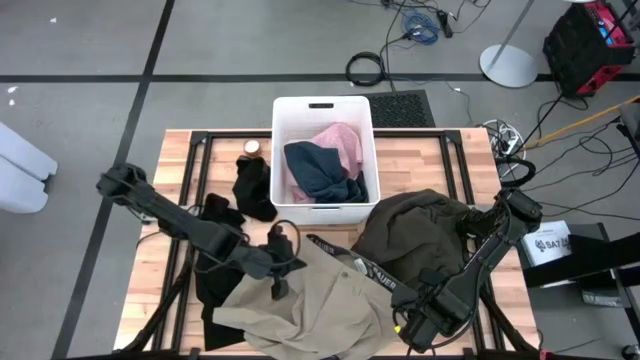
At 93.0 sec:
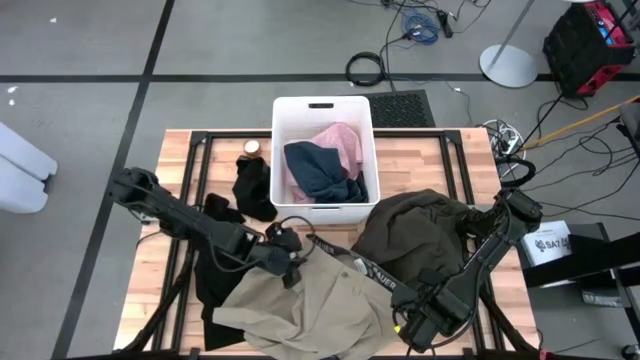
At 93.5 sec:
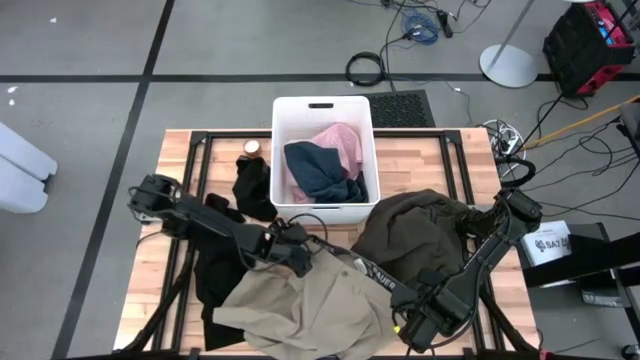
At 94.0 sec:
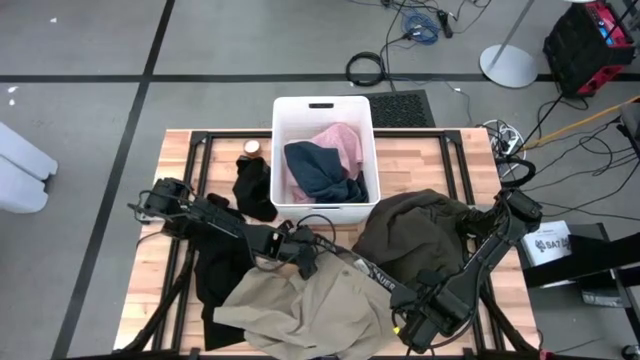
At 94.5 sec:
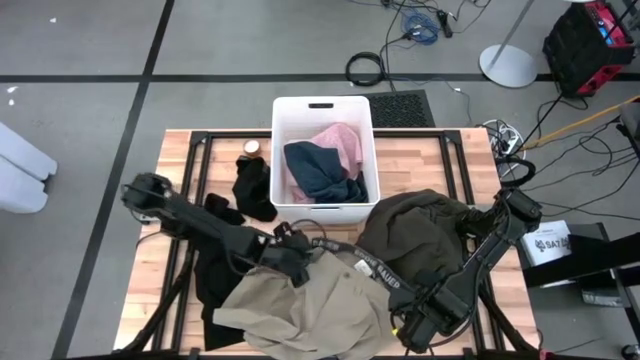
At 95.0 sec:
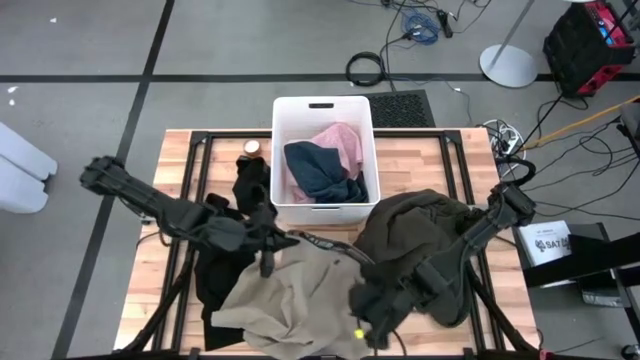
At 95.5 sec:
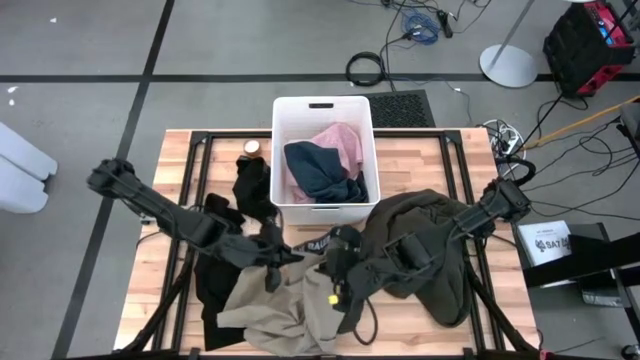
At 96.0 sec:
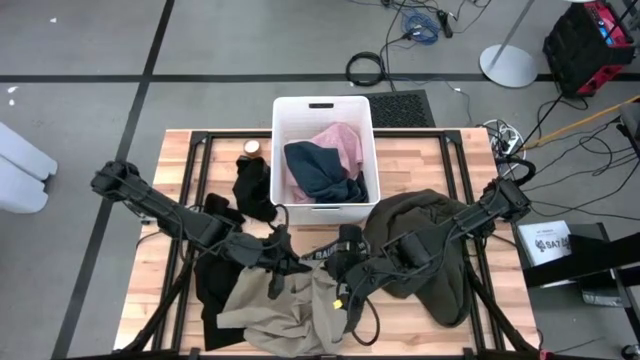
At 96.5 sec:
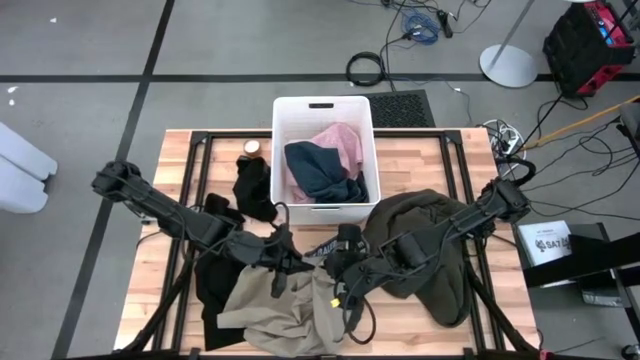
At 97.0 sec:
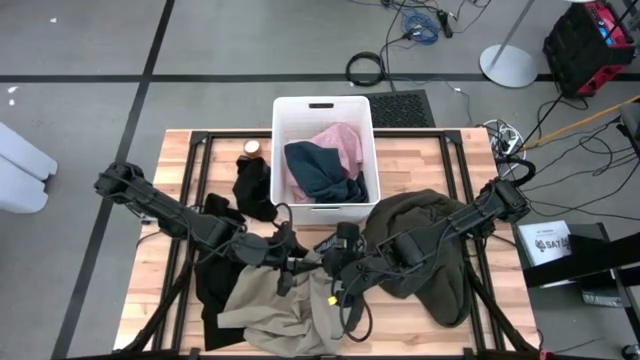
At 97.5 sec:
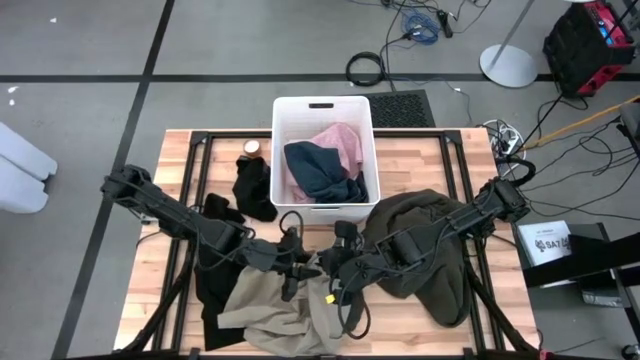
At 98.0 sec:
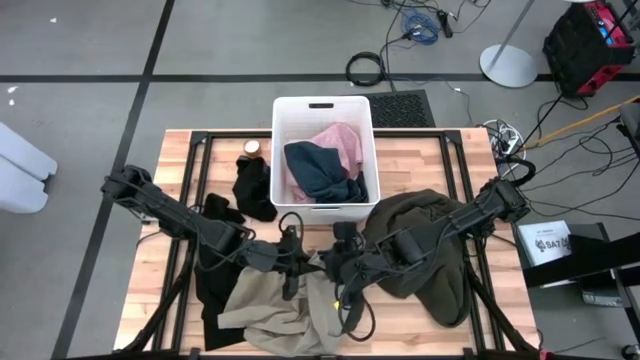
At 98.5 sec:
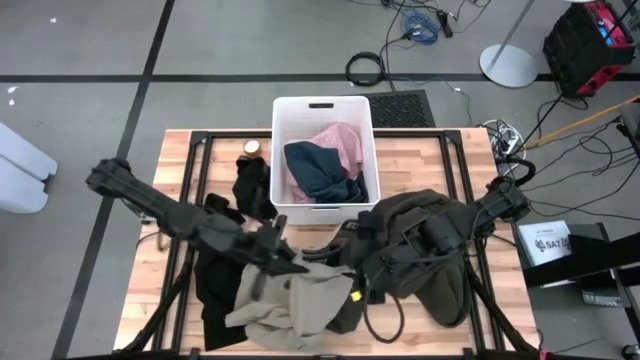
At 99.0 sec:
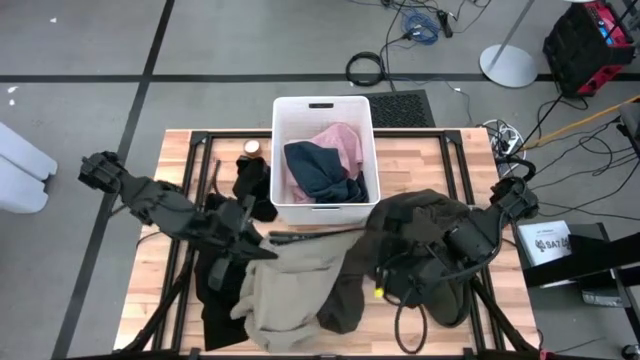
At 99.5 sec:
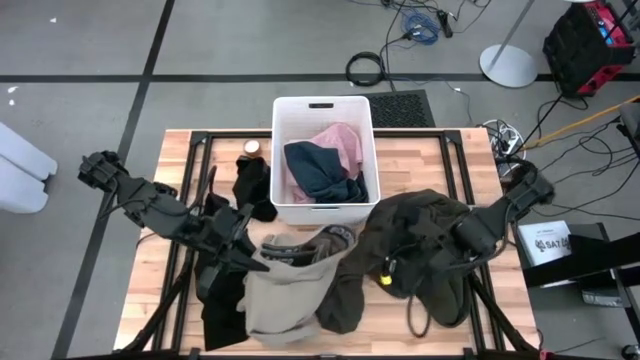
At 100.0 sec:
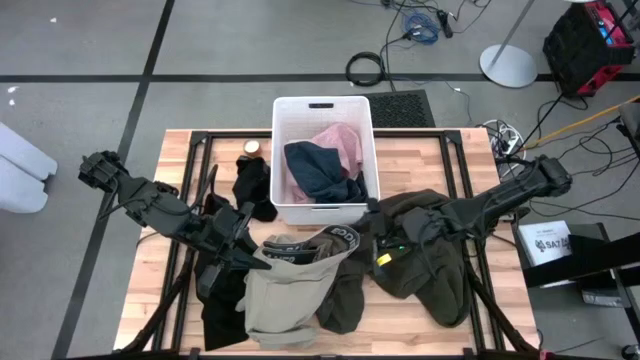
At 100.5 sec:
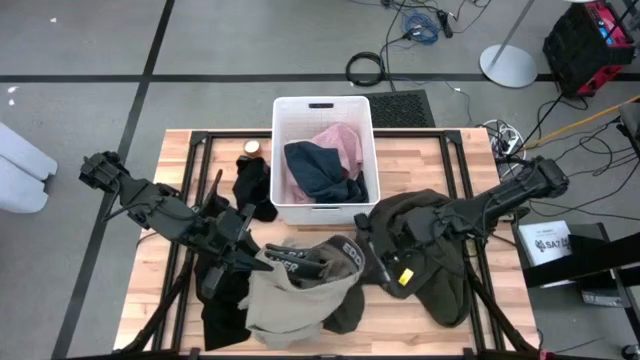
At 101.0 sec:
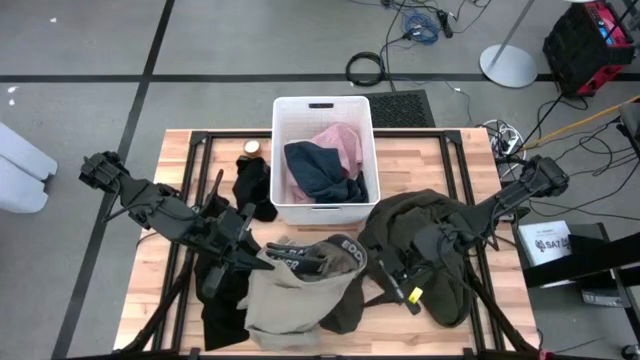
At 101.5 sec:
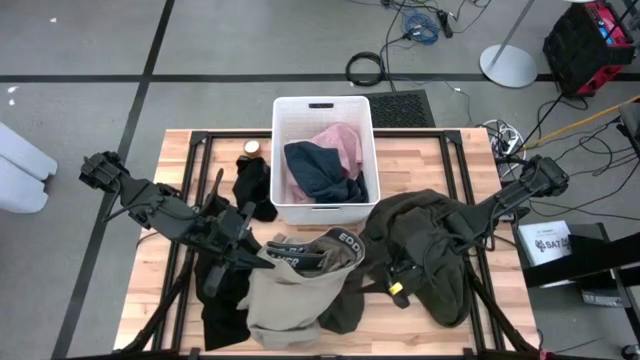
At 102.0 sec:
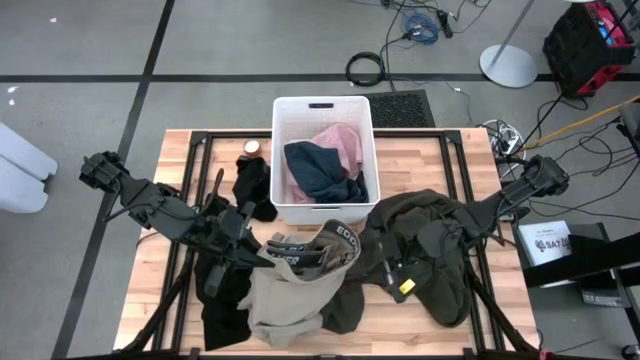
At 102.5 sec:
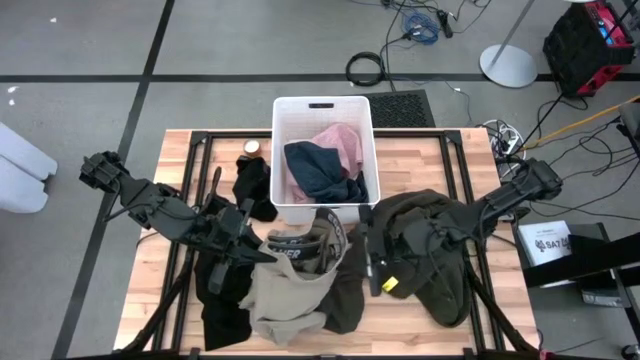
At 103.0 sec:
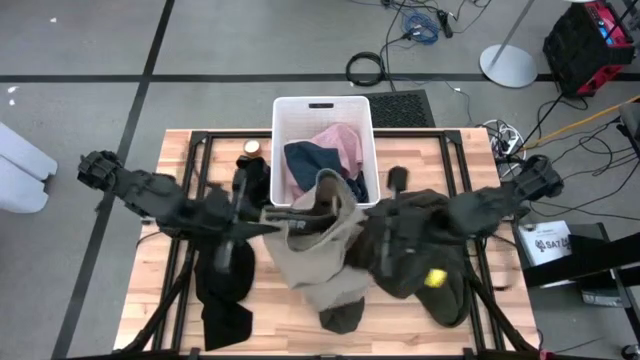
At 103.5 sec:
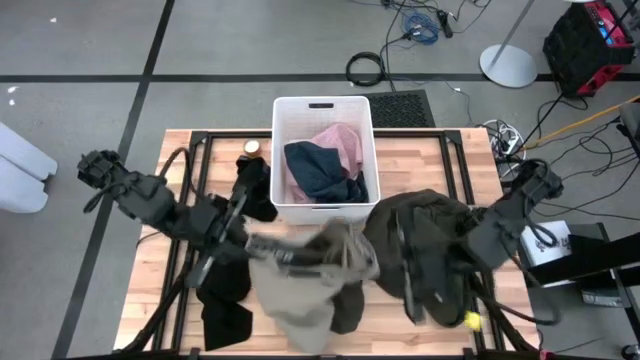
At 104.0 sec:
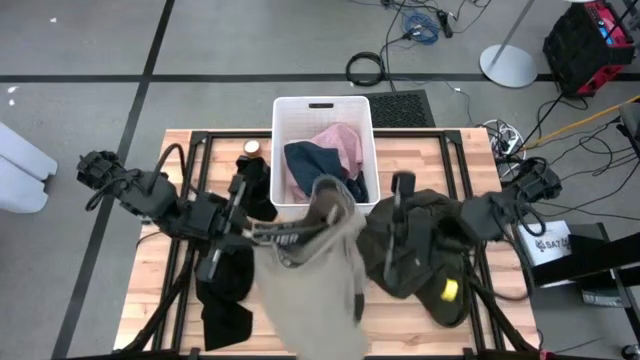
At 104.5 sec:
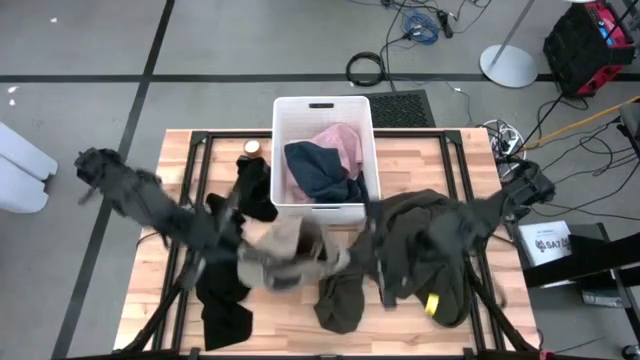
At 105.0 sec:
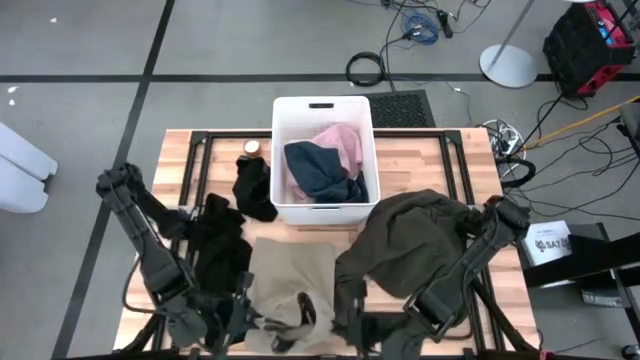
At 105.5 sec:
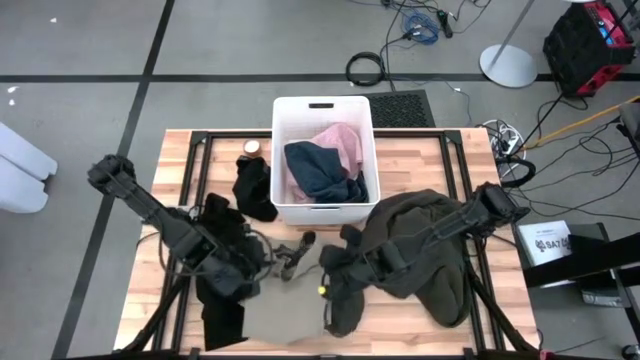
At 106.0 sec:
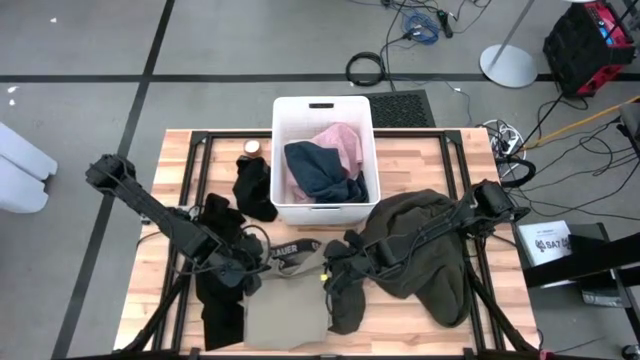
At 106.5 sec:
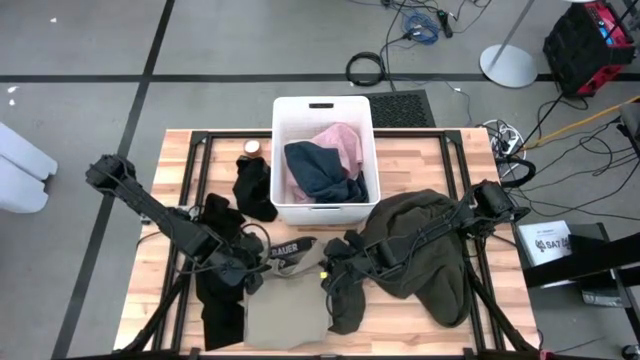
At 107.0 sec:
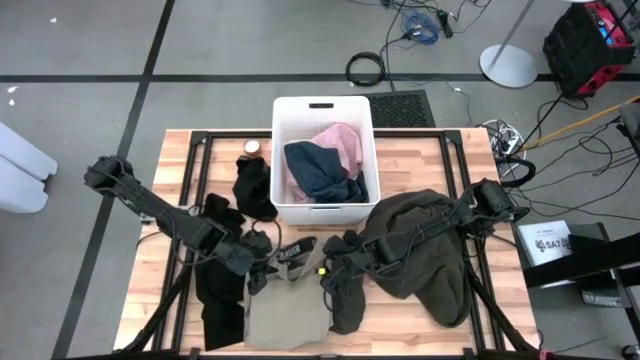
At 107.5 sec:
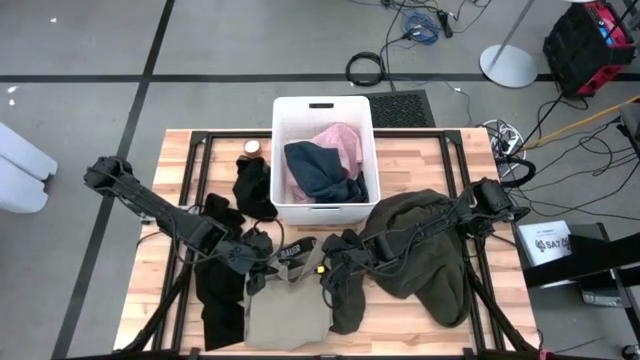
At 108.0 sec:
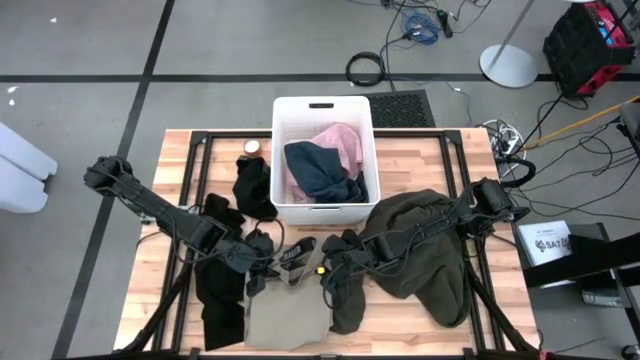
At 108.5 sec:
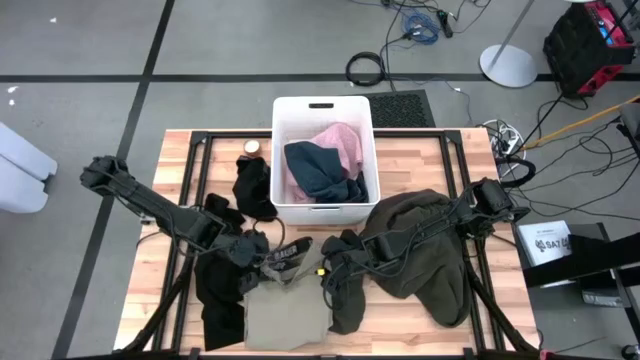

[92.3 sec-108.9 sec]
Task: Fold laundry
Fold the light brown short pants

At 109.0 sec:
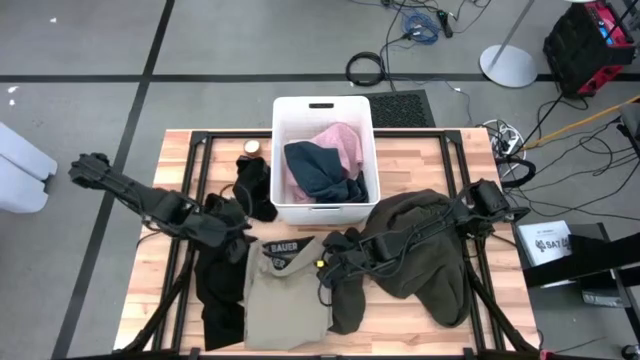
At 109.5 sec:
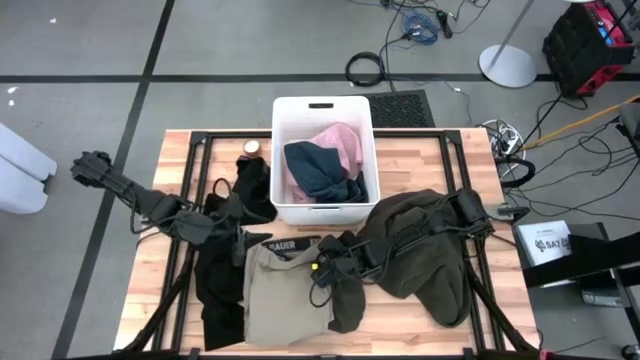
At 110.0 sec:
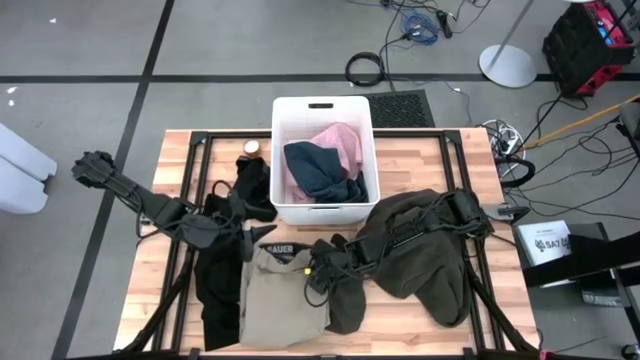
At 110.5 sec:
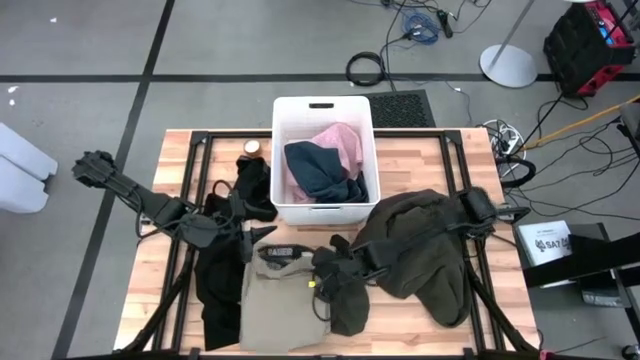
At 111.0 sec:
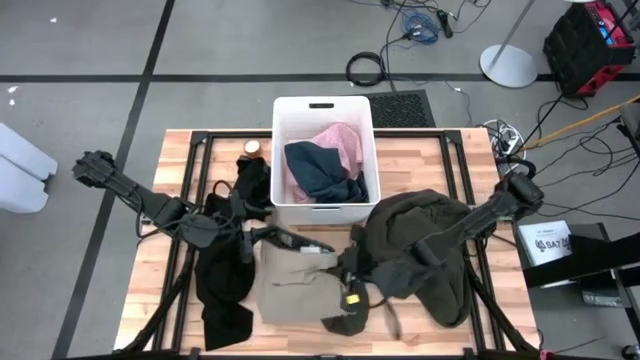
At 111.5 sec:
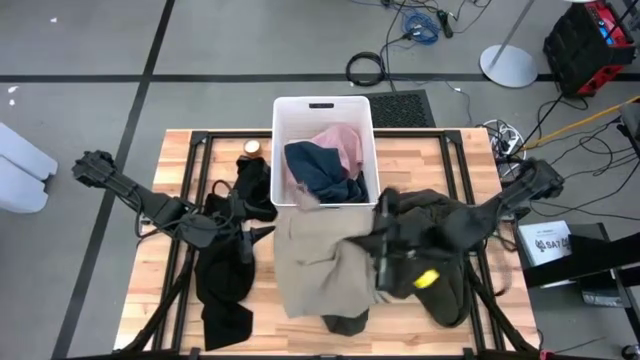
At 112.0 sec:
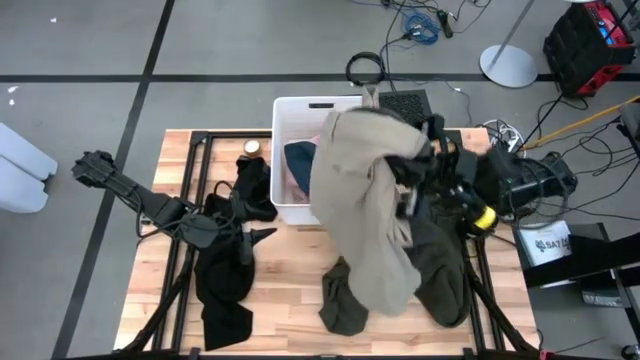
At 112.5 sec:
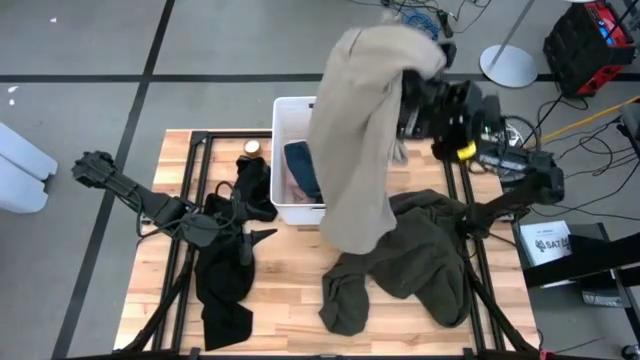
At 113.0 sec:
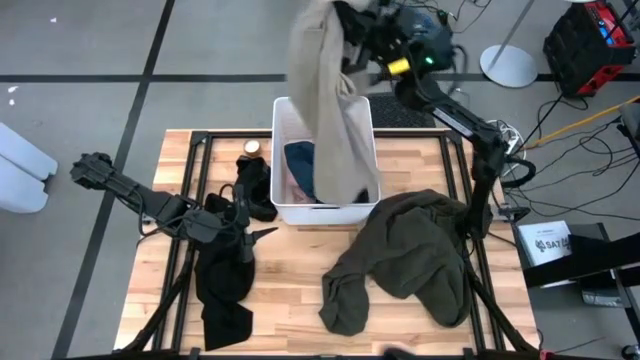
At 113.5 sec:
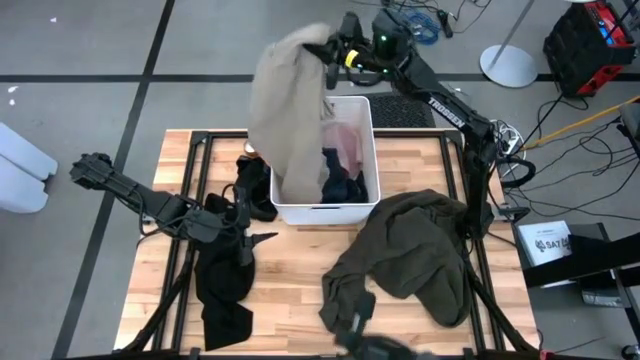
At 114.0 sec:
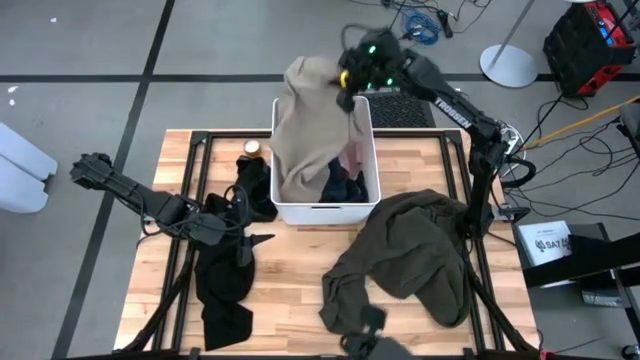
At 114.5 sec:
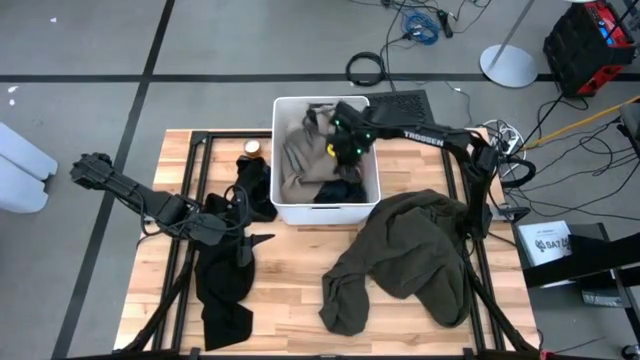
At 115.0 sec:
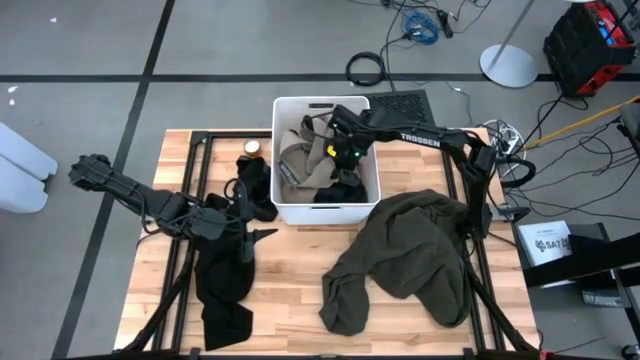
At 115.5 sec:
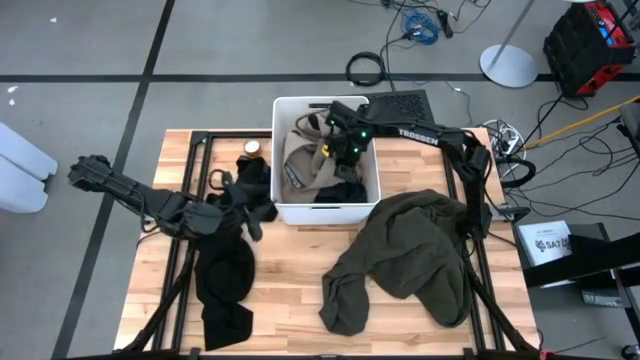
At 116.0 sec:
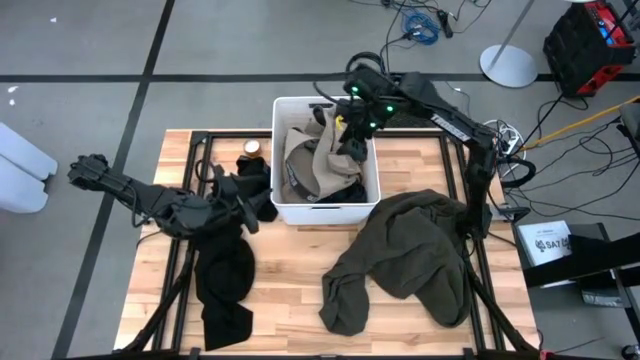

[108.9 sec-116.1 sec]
Put the folded light brown short pants into the white laundry bin
